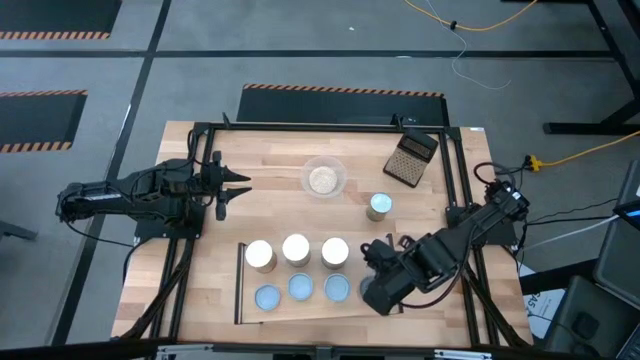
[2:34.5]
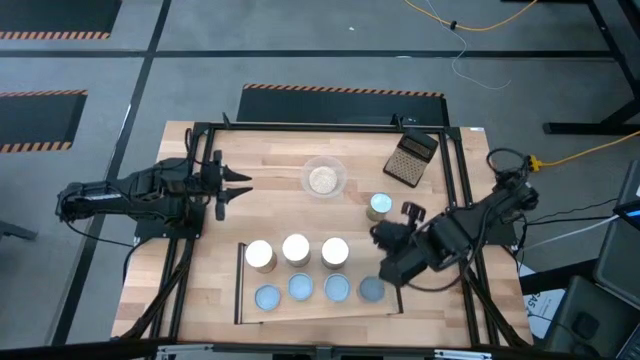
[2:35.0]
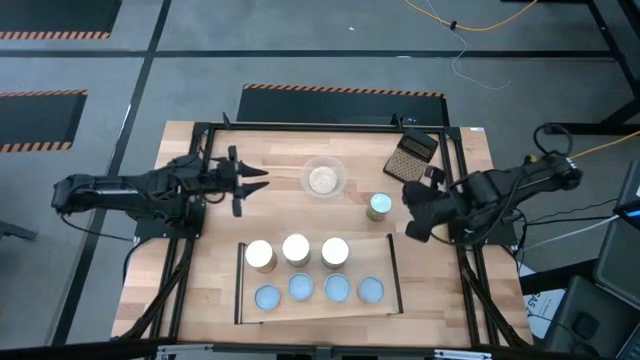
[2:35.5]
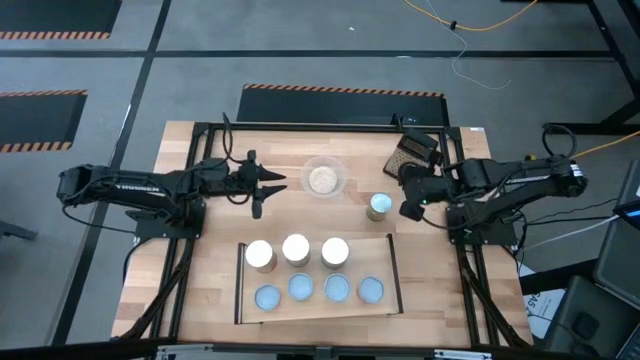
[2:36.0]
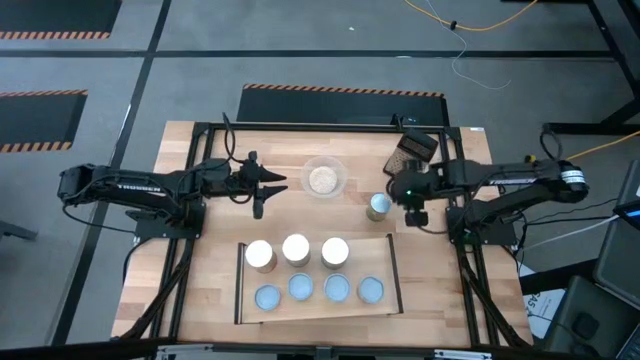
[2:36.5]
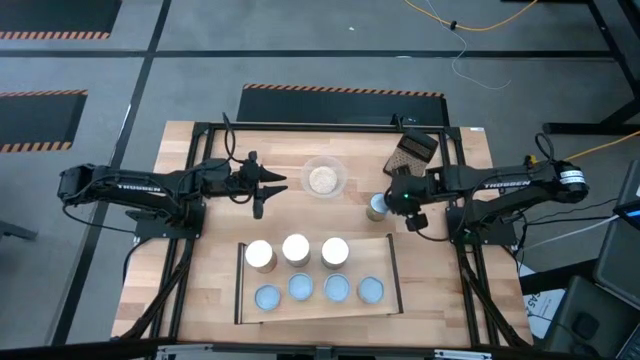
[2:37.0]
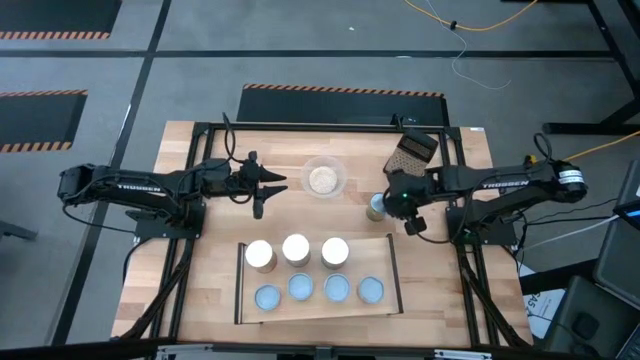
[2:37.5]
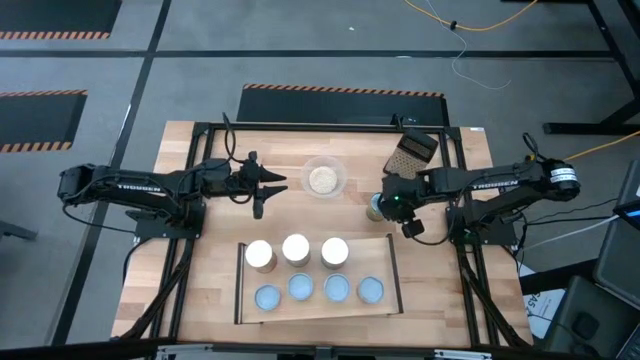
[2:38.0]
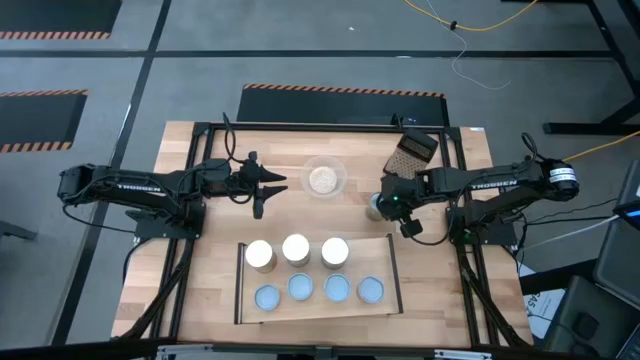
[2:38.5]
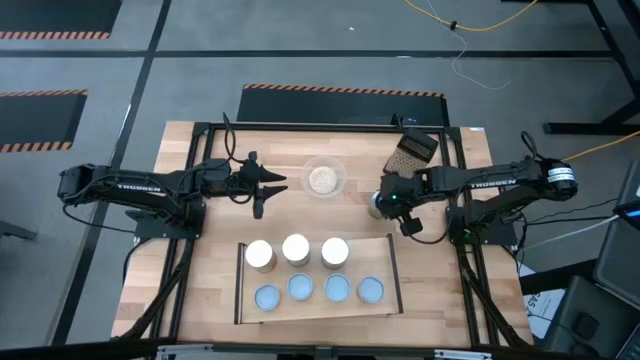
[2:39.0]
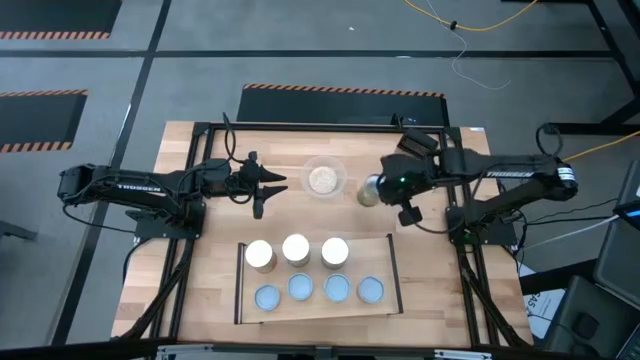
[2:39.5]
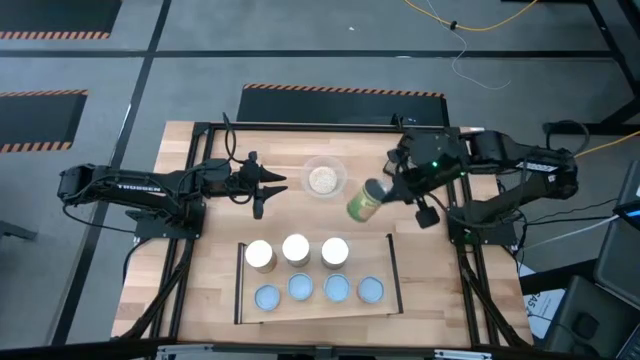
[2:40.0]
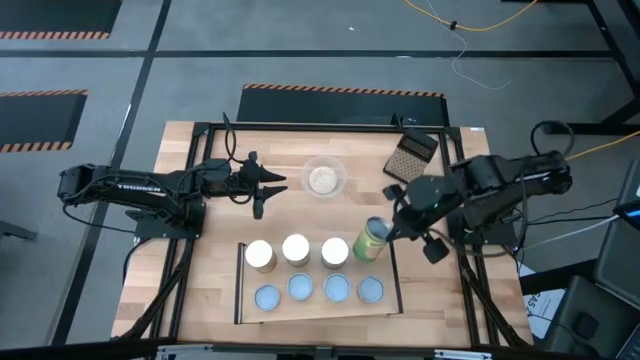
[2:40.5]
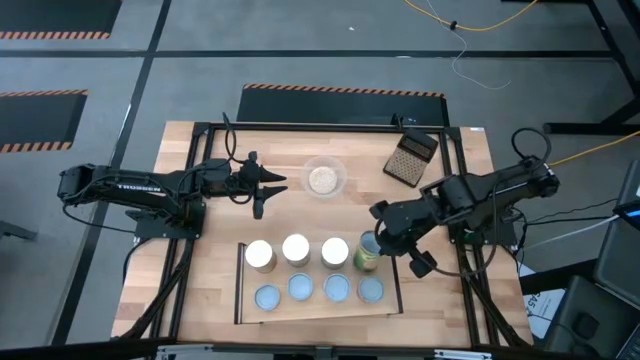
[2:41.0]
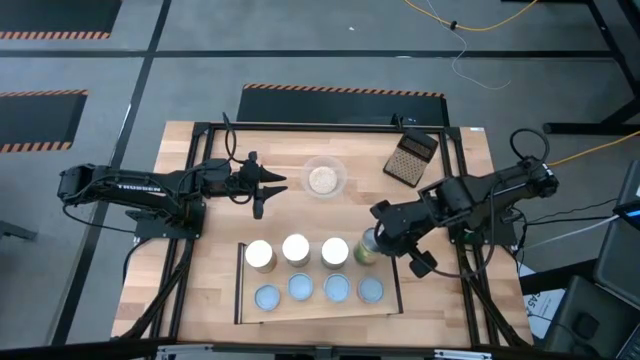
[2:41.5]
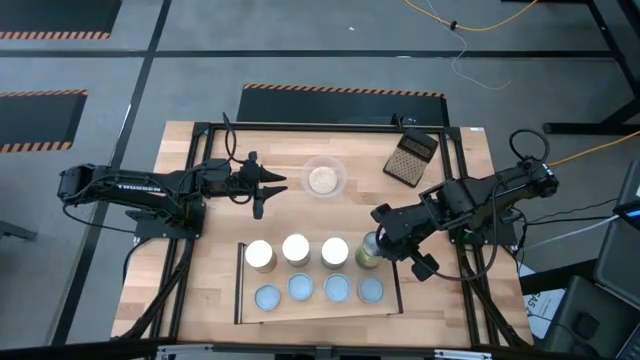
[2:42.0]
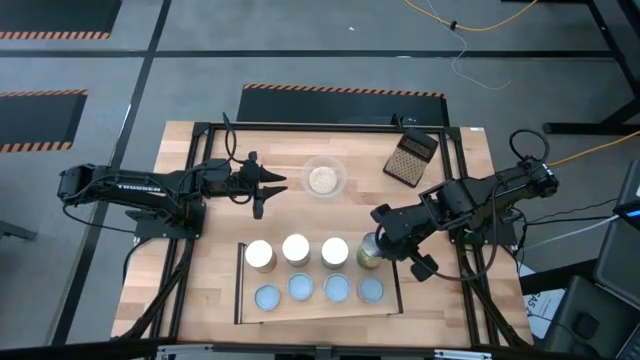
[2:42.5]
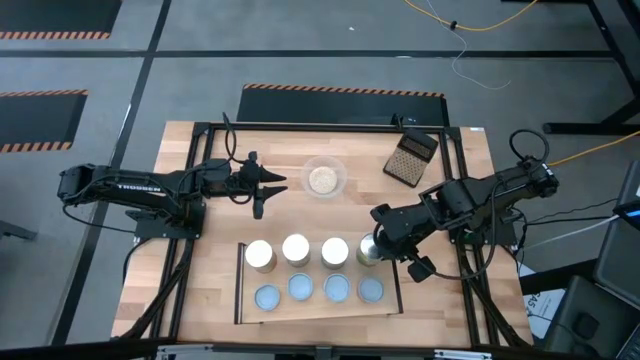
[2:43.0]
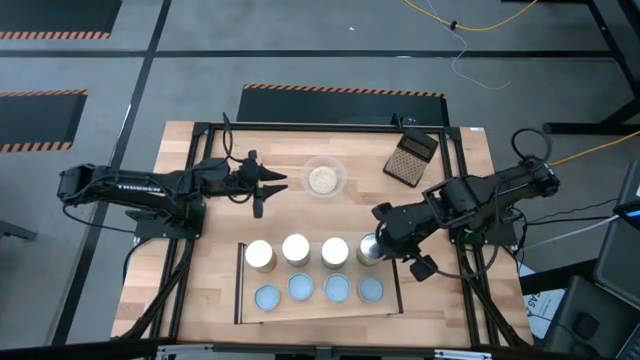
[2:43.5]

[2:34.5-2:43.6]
Task: Pick and place cans onto a shelf
Put the large canned oranges on the shelf

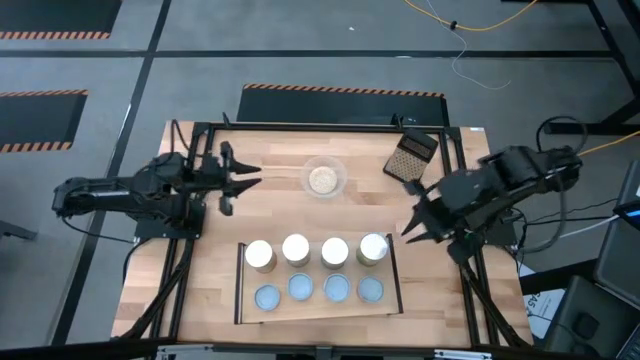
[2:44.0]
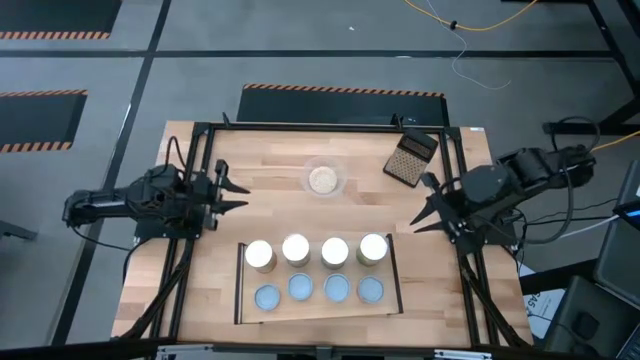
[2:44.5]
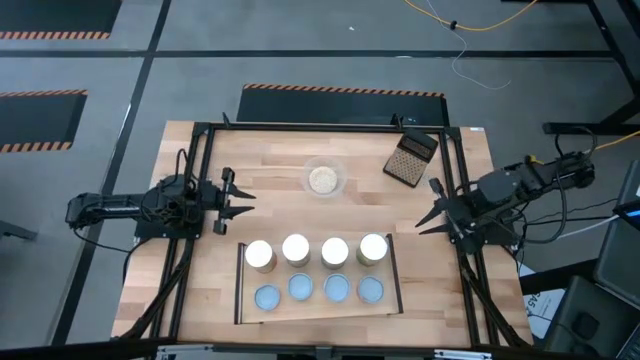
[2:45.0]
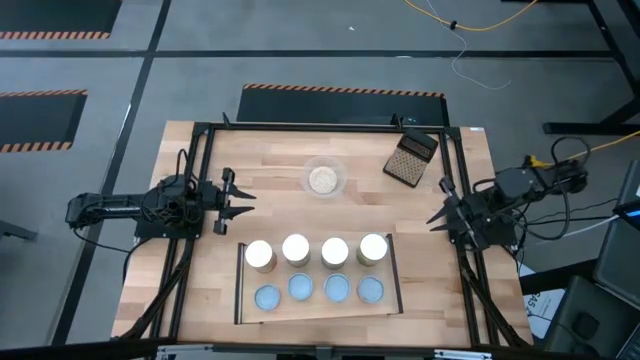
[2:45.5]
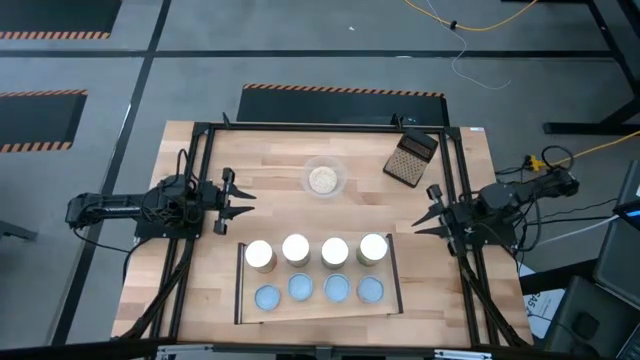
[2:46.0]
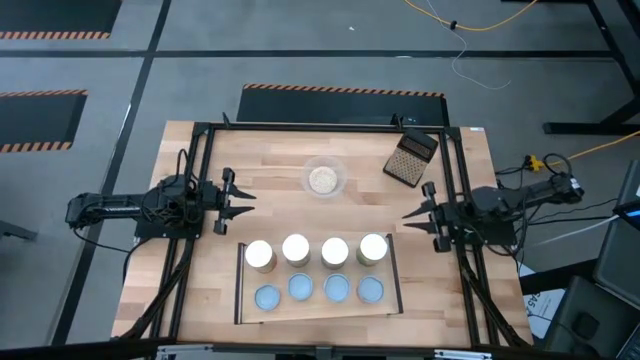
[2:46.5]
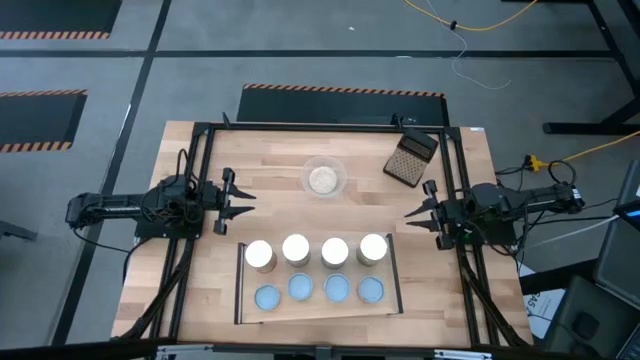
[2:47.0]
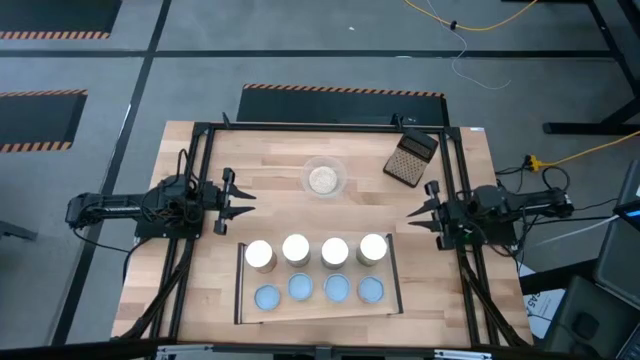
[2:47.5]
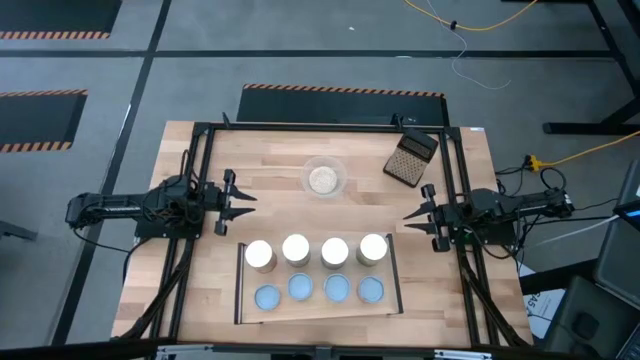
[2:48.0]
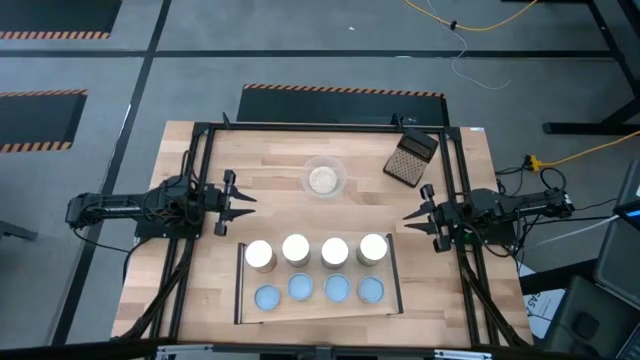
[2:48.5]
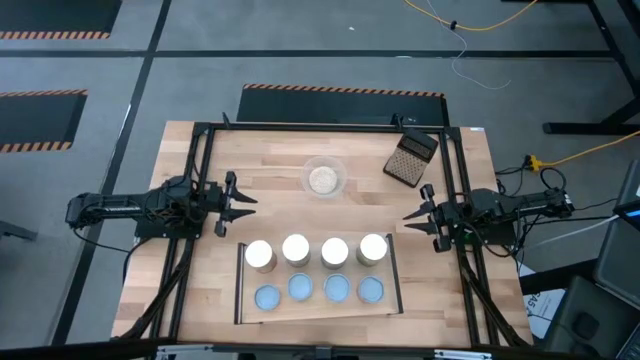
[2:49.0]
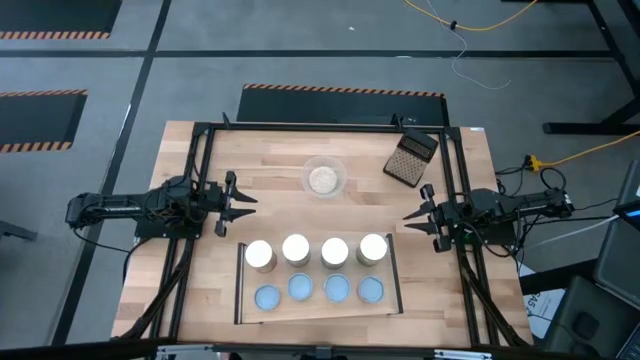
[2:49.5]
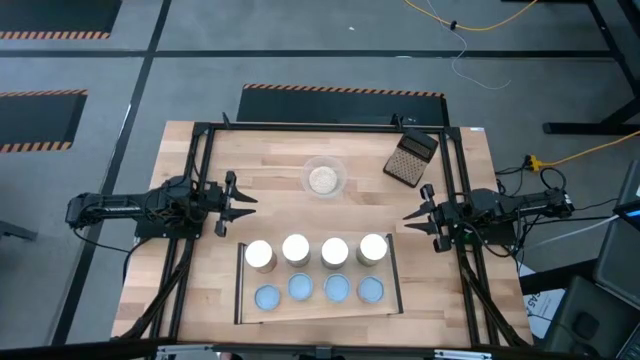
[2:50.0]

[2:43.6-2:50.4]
Return to Home Position

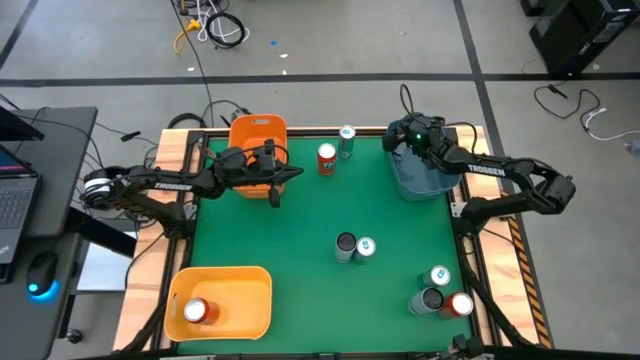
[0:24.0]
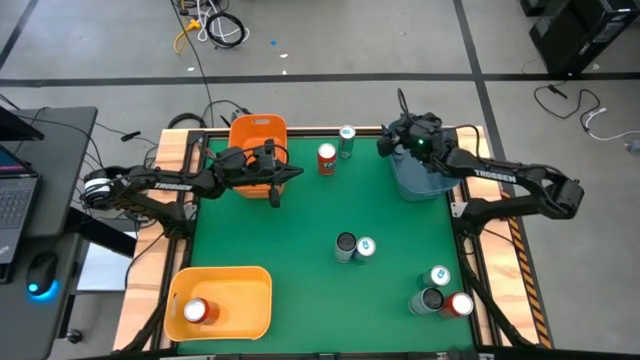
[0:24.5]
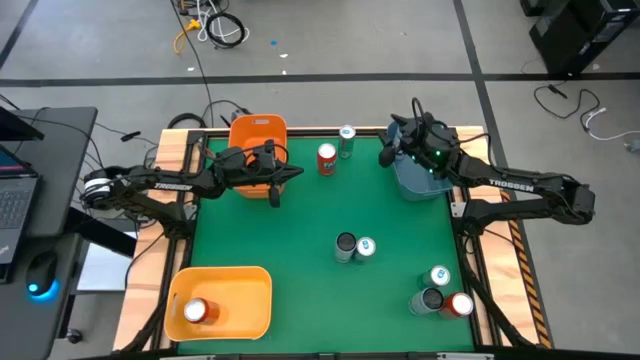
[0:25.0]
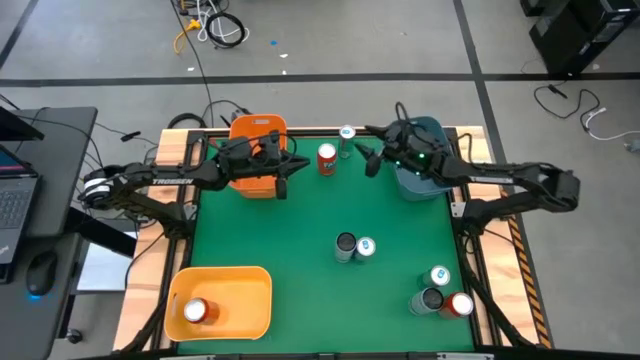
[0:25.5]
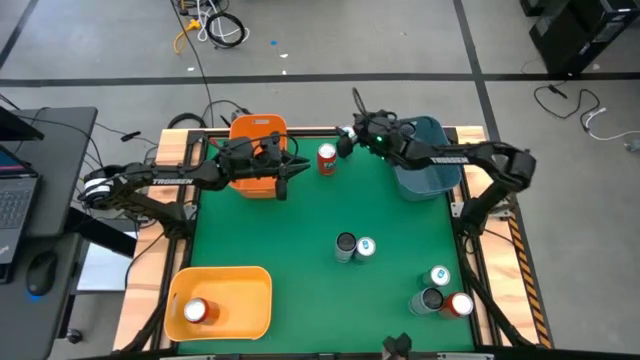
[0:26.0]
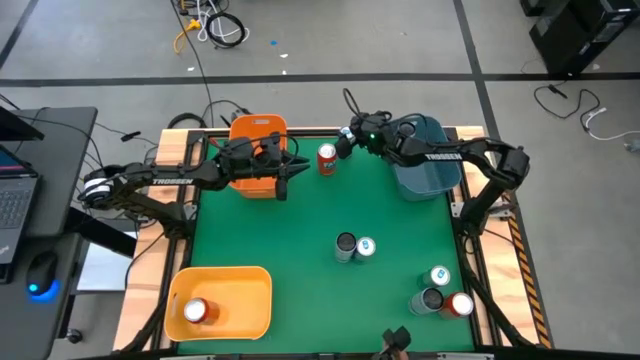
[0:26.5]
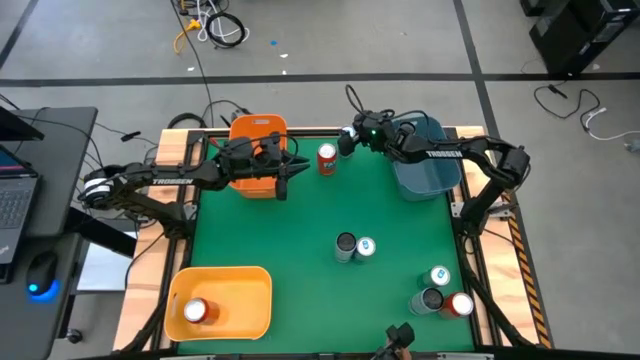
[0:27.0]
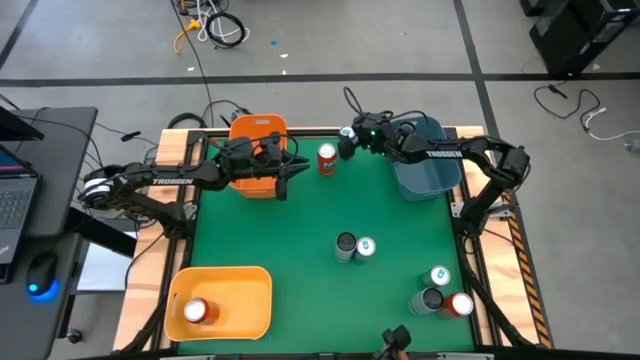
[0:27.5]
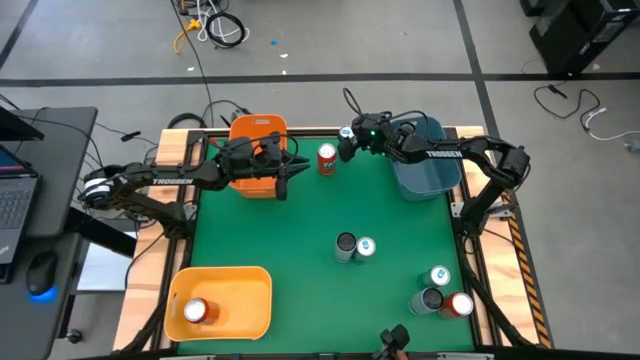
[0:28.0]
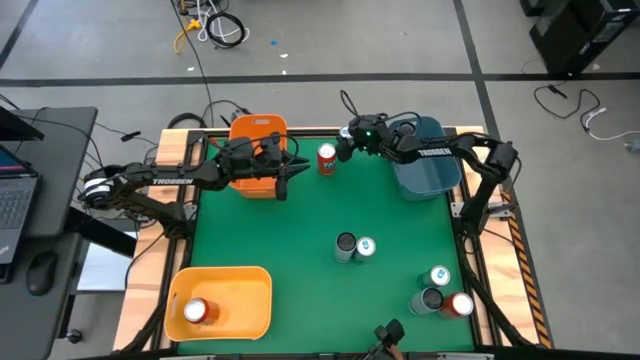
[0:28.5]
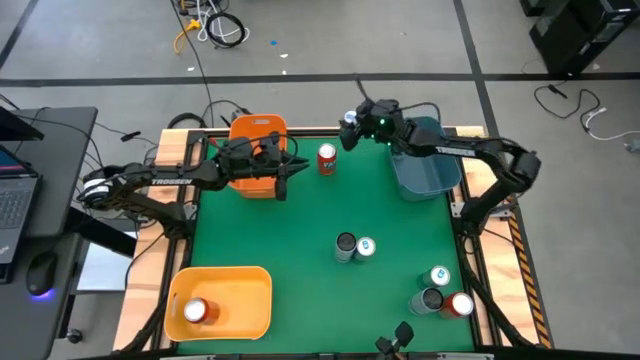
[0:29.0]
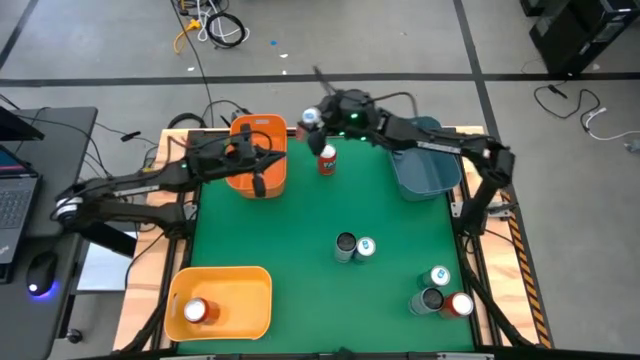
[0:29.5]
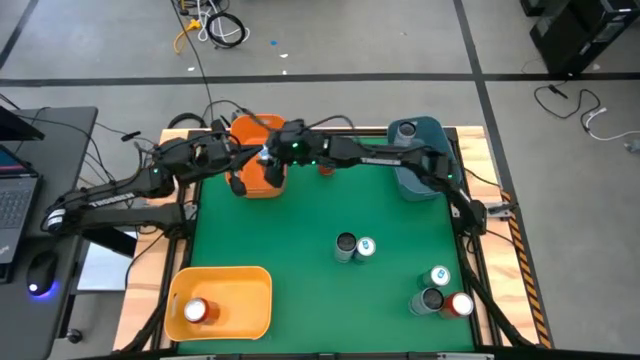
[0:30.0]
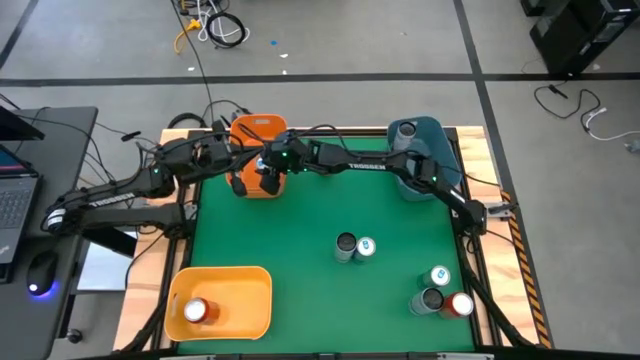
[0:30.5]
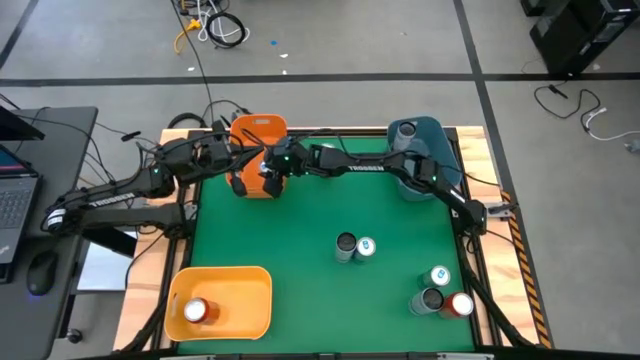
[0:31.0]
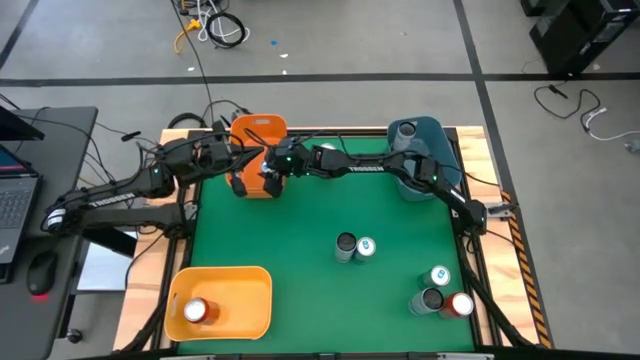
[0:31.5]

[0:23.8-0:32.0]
Task: Sort soda cans
Put the top blue soda can into the orange bin
